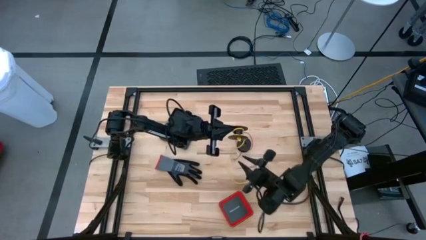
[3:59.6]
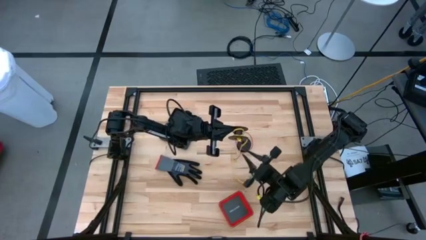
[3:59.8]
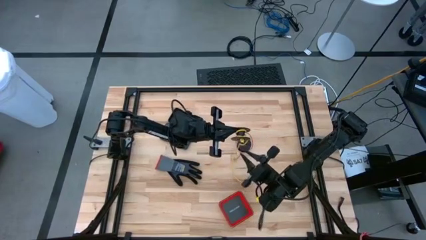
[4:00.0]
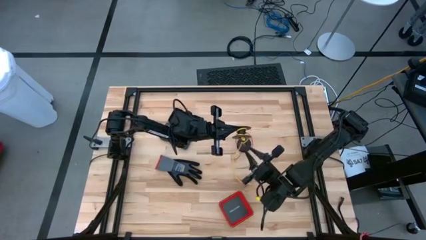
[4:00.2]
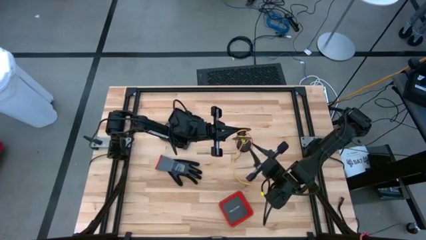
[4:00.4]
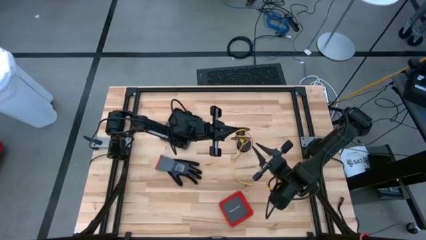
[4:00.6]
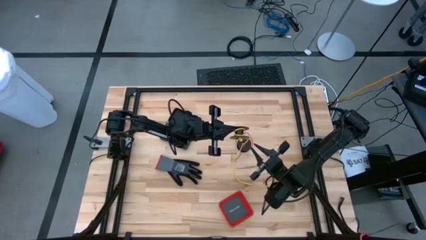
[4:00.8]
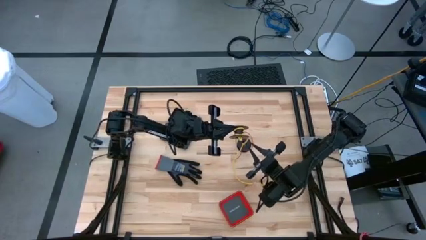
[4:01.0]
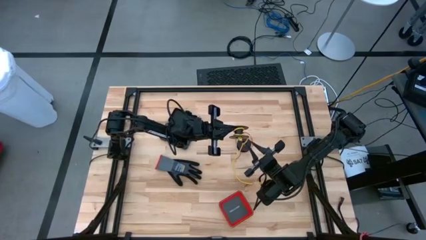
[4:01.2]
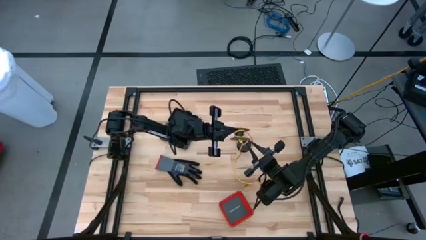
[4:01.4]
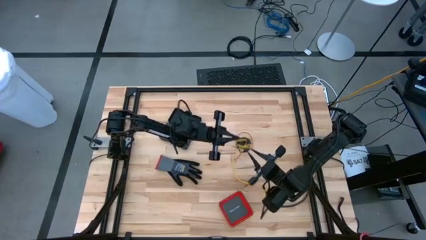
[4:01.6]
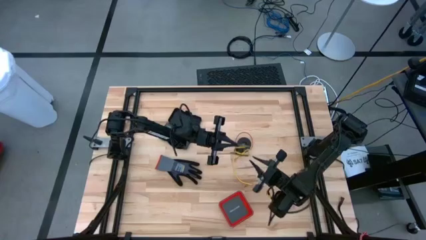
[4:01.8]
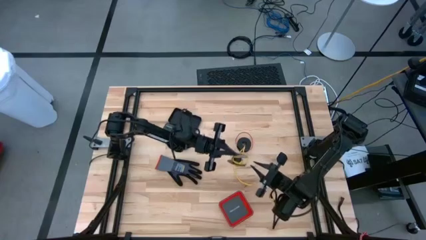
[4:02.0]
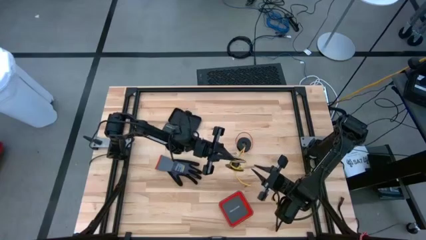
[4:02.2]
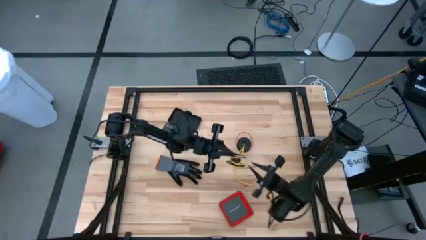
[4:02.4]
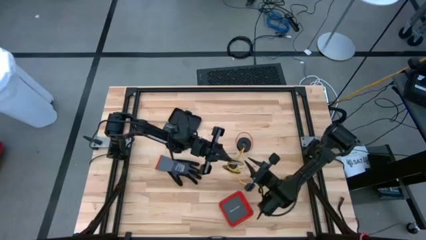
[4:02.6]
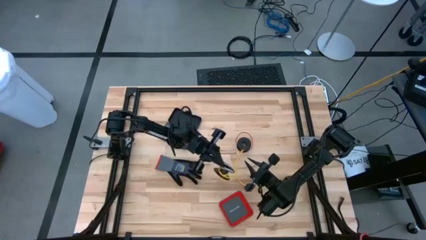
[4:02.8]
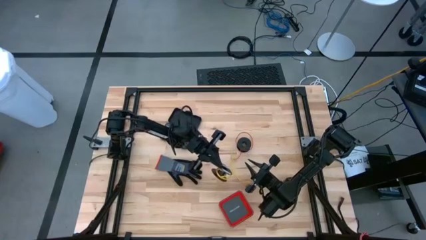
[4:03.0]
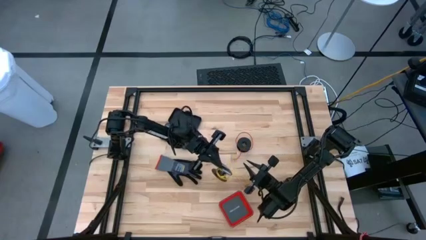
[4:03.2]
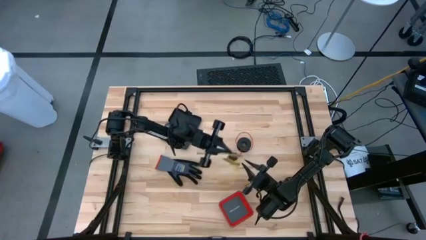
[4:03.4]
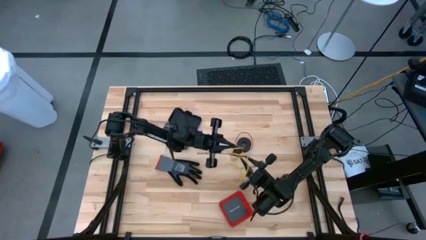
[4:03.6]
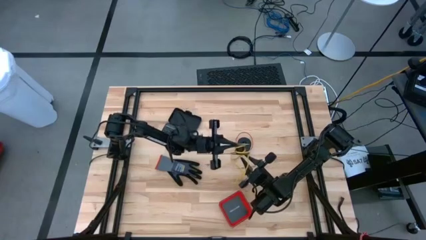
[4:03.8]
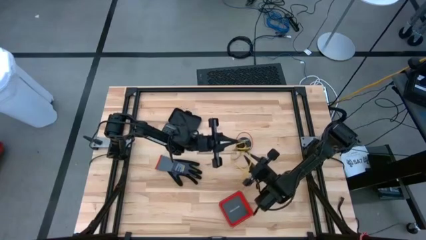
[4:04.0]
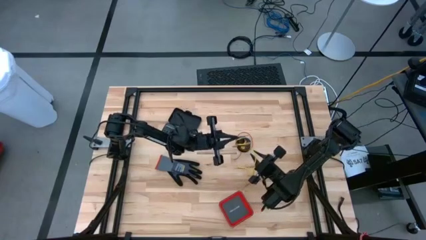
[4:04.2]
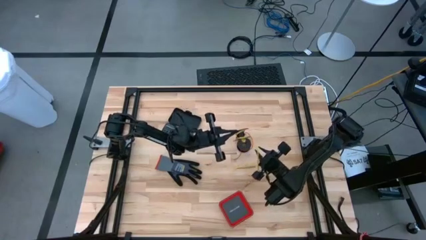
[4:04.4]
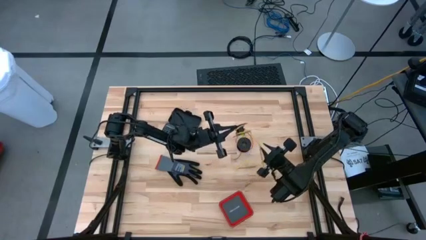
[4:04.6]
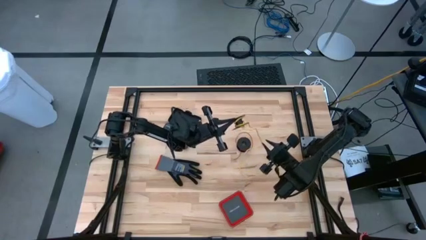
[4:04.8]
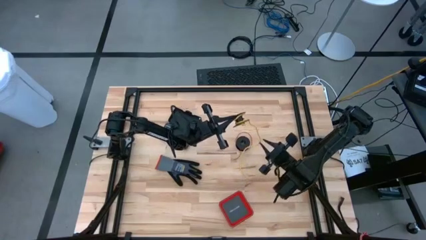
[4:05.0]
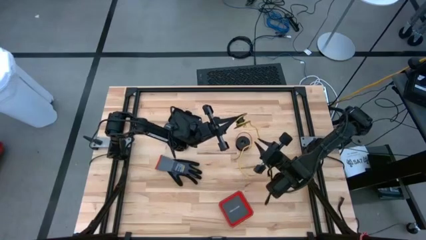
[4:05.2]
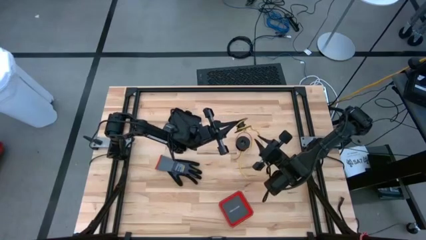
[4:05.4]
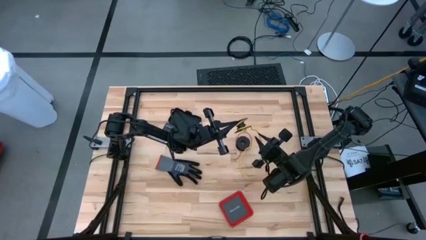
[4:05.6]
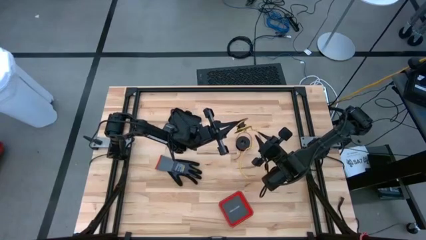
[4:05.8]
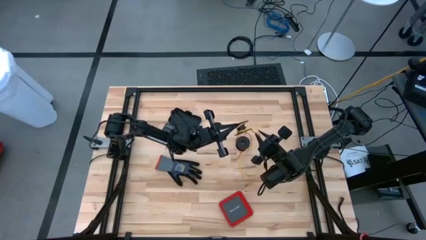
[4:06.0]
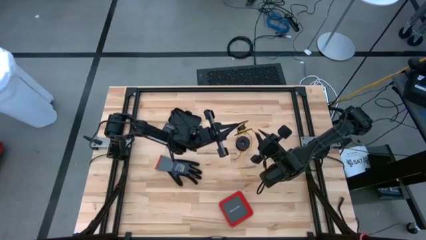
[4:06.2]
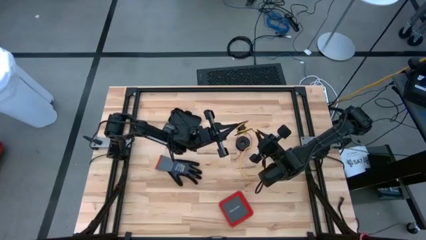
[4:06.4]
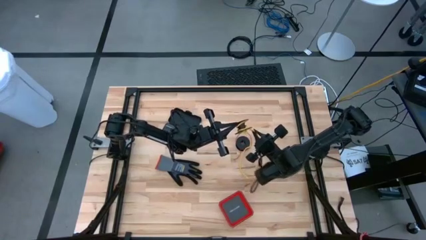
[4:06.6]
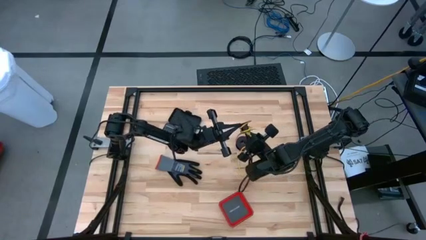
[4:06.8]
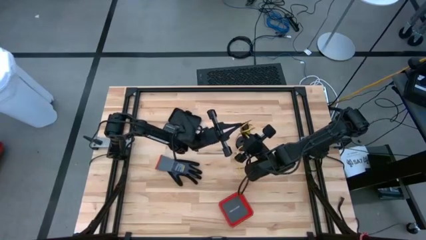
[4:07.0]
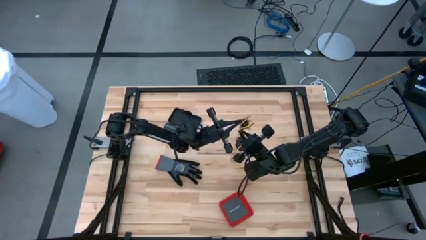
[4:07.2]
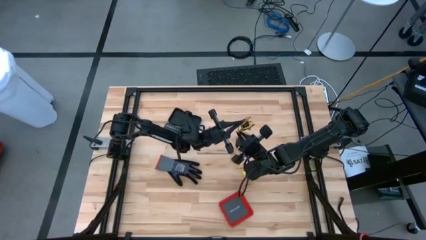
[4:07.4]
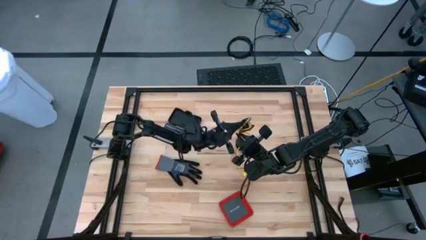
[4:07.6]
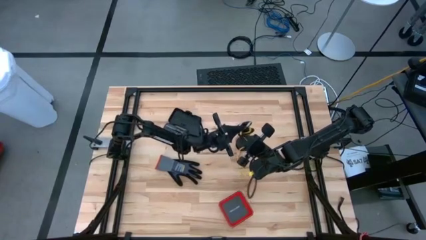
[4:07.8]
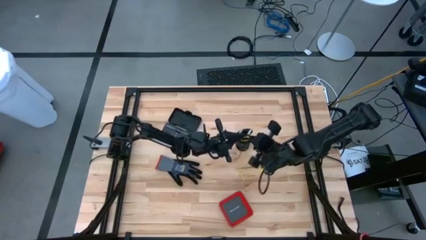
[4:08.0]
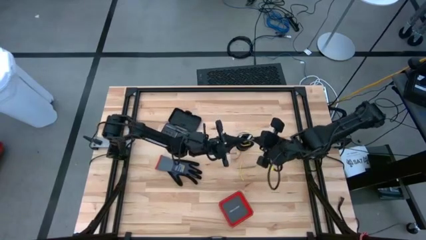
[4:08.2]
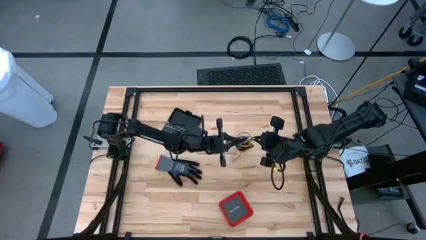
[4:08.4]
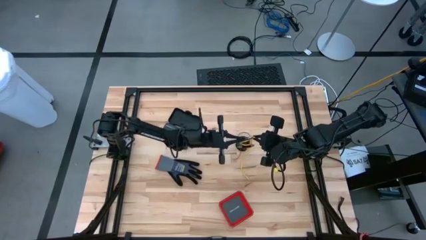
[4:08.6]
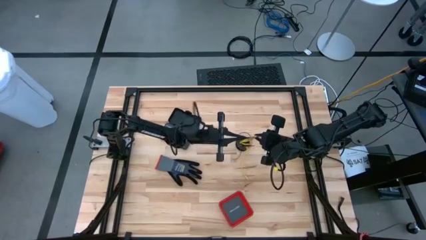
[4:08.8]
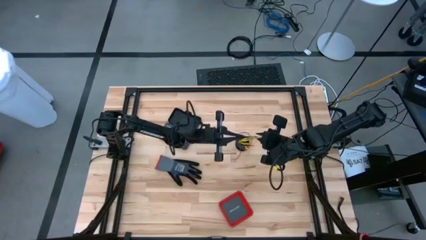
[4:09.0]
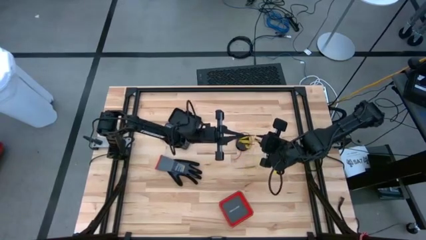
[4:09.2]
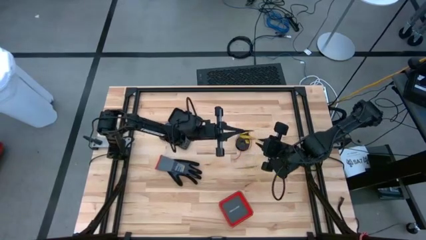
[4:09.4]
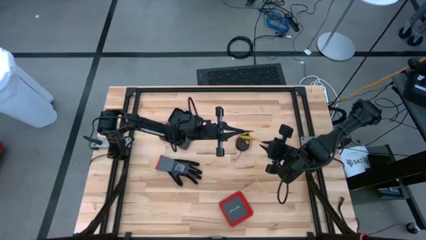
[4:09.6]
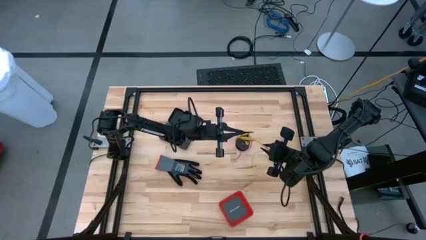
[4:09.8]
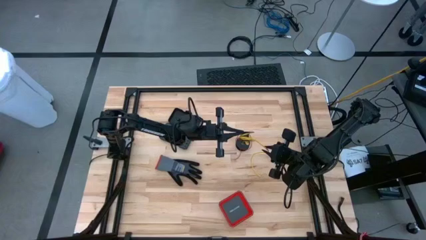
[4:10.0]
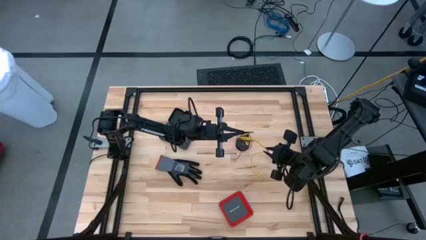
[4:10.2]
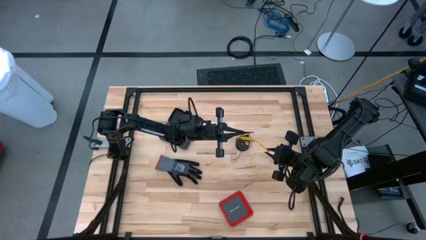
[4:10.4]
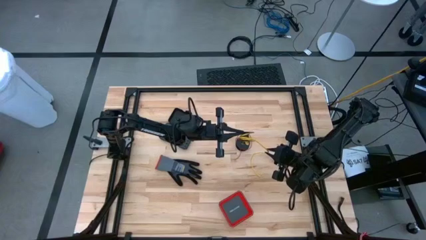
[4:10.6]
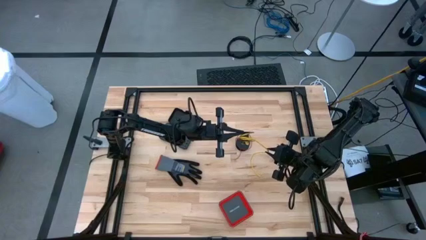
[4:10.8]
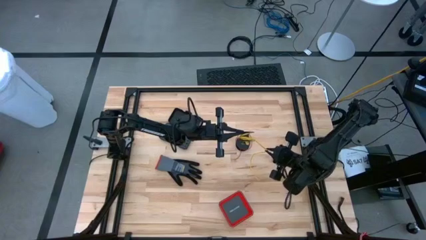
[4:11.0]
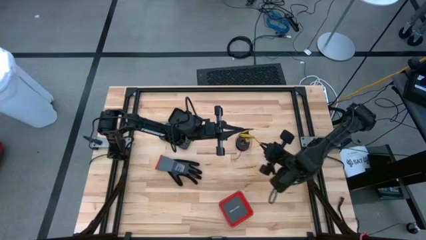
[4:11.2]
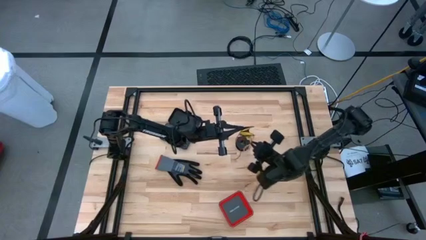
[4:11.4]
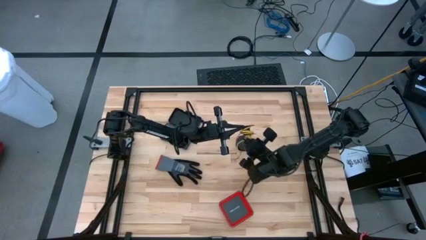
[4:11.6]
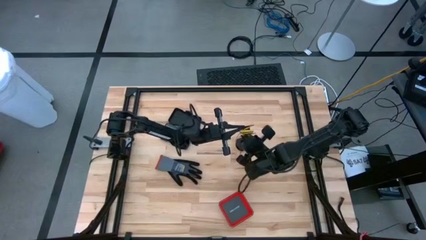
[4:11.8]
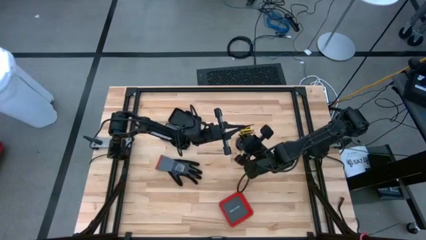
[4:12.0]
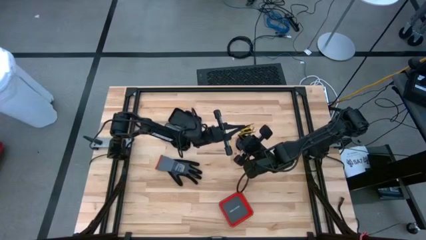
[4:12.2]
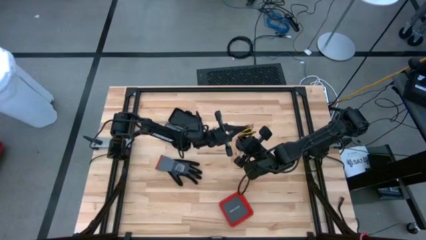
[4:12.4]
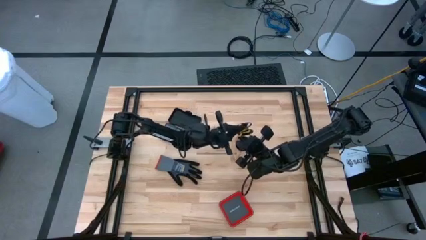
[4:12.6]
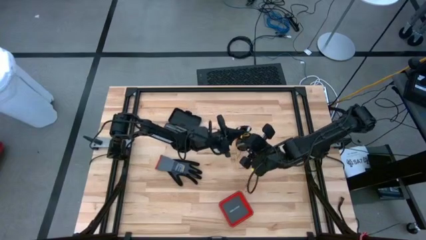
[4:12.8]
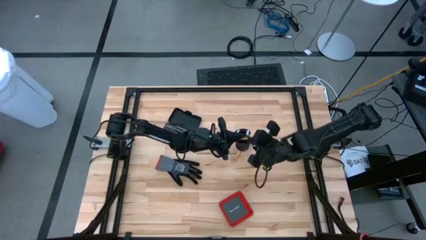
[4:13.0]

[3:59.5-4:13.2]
Task: Coil cords
Coil the yellow wire onto the spool
